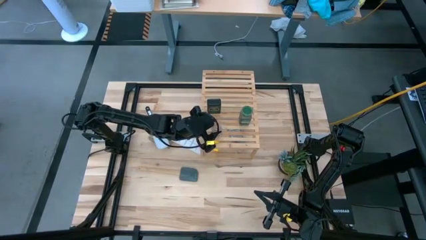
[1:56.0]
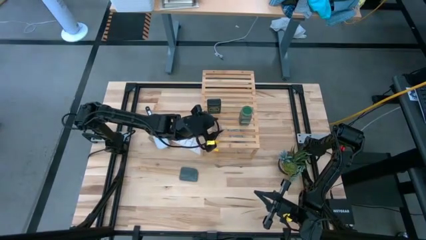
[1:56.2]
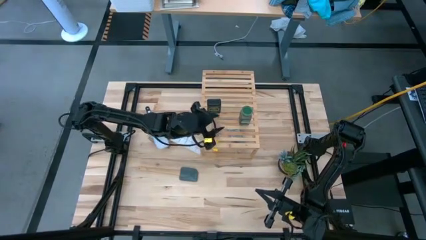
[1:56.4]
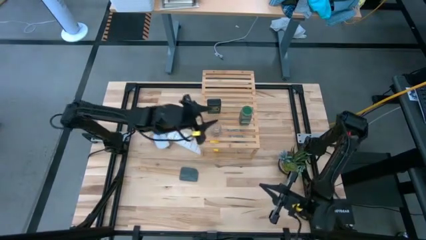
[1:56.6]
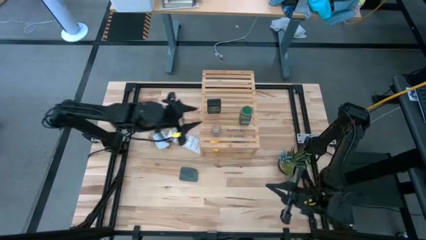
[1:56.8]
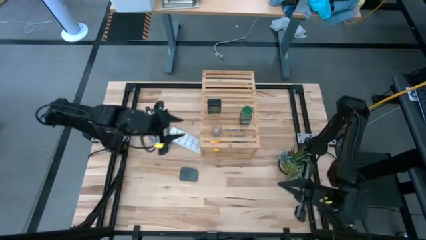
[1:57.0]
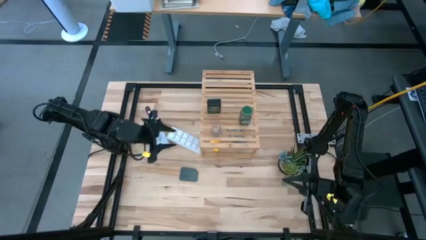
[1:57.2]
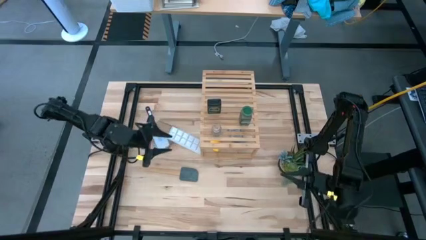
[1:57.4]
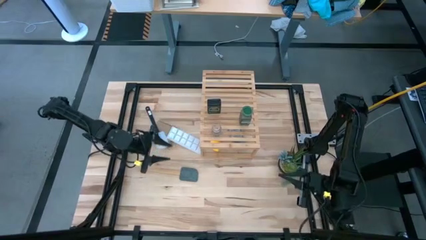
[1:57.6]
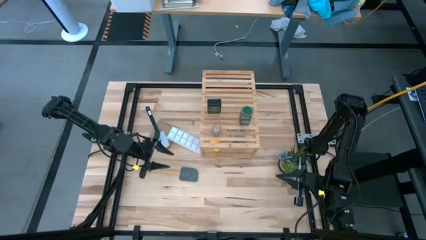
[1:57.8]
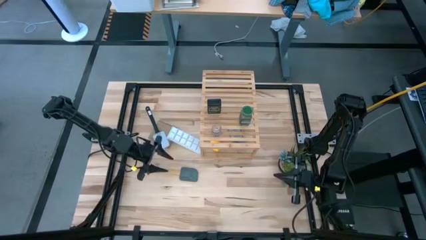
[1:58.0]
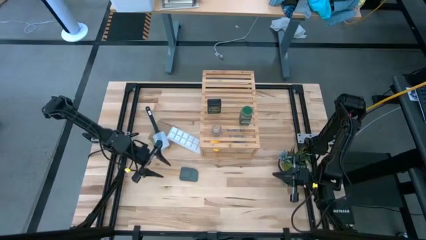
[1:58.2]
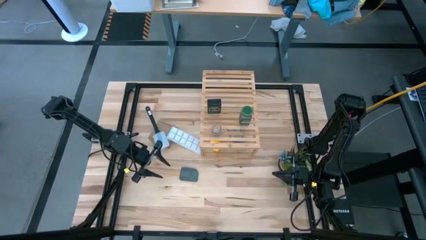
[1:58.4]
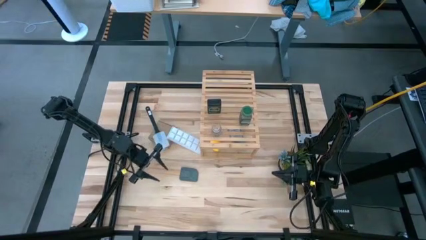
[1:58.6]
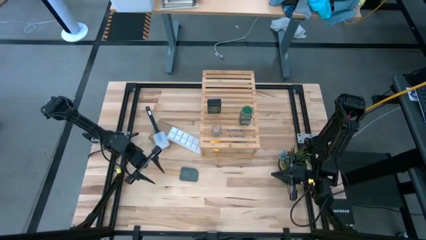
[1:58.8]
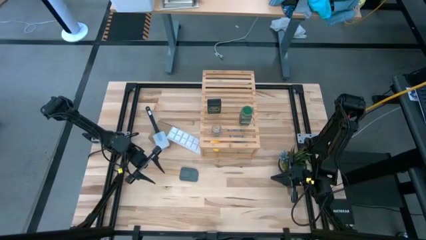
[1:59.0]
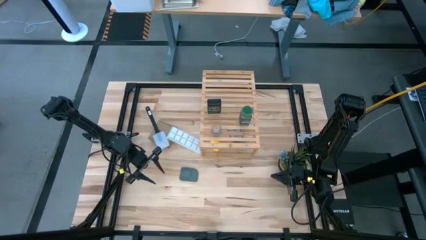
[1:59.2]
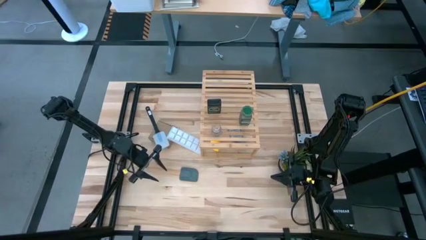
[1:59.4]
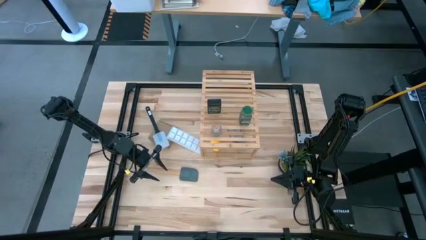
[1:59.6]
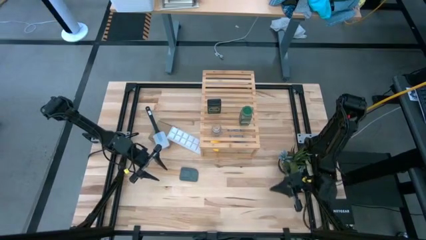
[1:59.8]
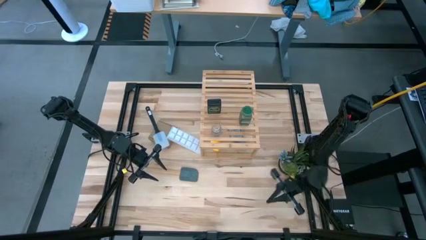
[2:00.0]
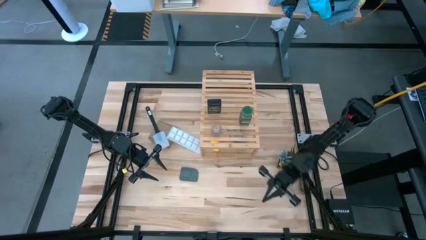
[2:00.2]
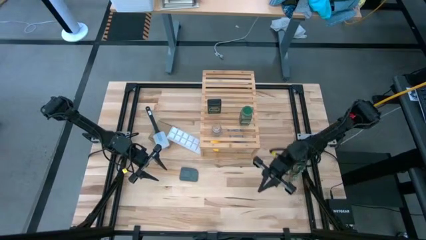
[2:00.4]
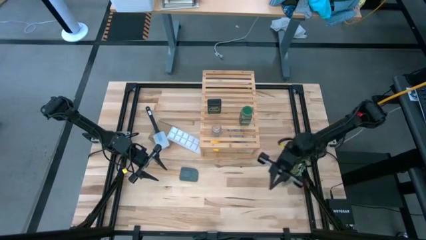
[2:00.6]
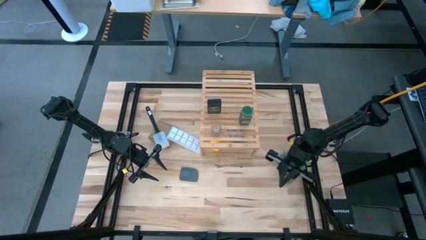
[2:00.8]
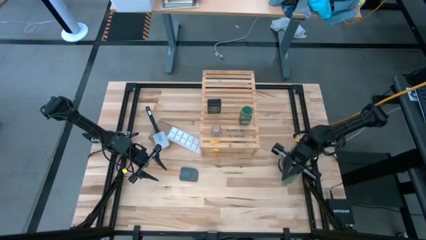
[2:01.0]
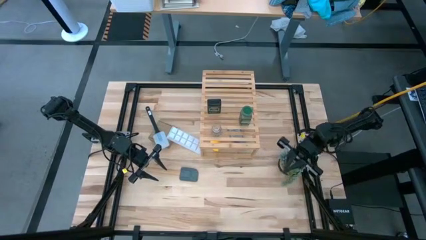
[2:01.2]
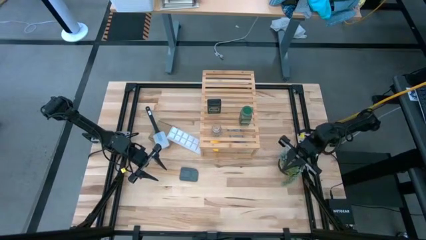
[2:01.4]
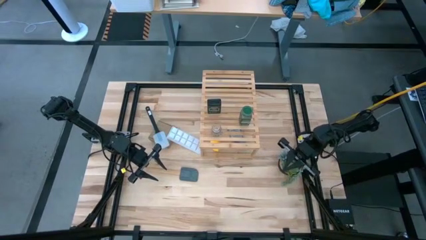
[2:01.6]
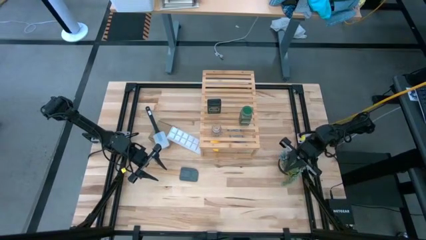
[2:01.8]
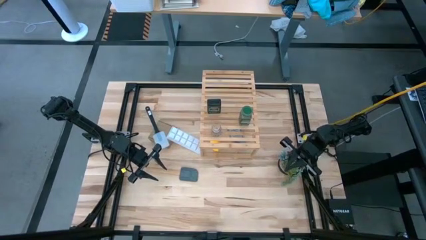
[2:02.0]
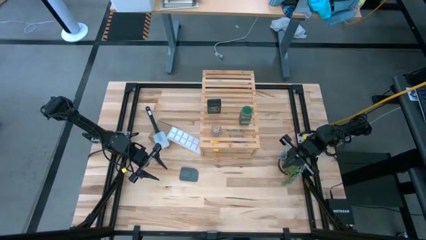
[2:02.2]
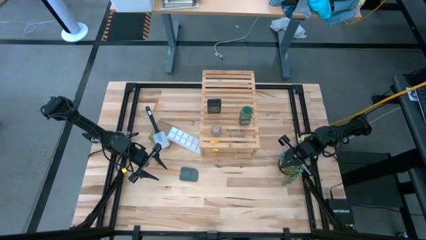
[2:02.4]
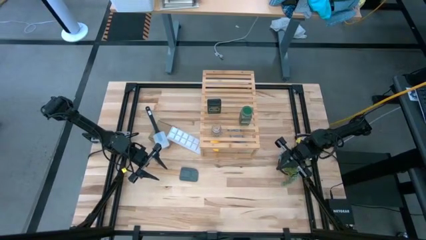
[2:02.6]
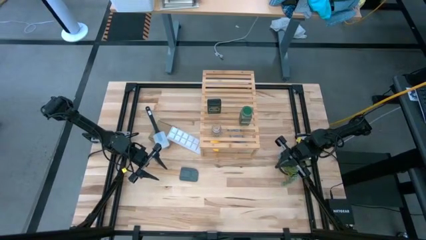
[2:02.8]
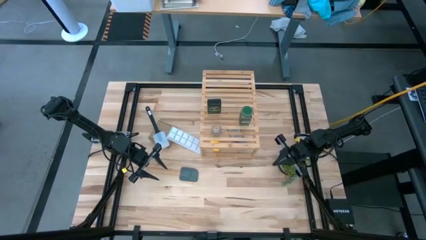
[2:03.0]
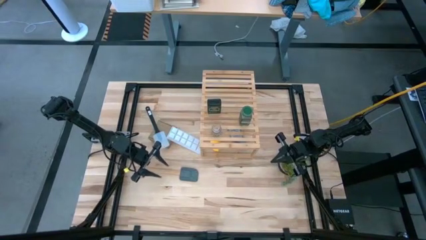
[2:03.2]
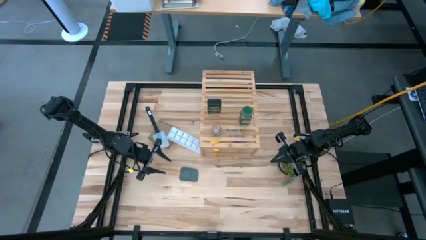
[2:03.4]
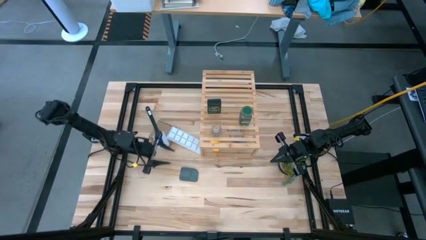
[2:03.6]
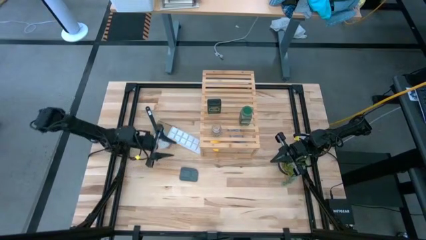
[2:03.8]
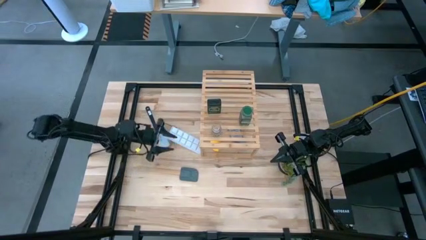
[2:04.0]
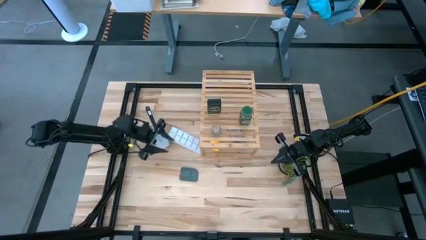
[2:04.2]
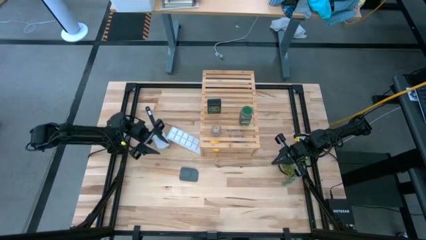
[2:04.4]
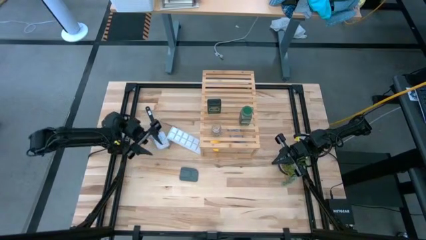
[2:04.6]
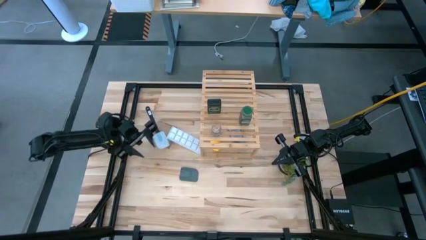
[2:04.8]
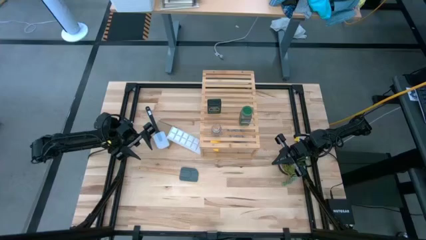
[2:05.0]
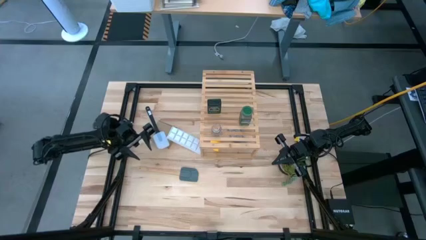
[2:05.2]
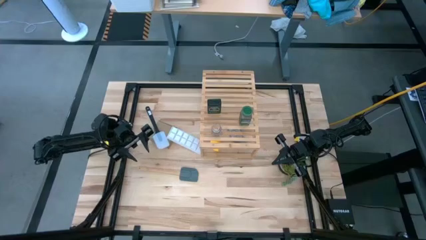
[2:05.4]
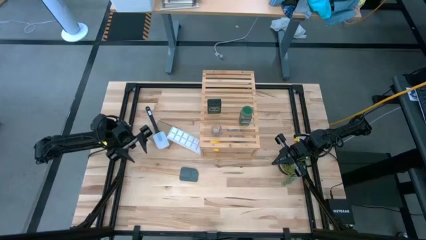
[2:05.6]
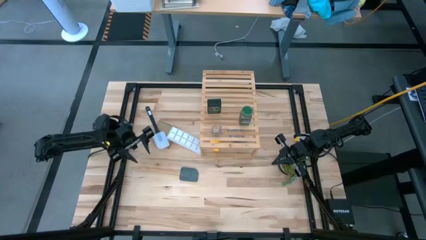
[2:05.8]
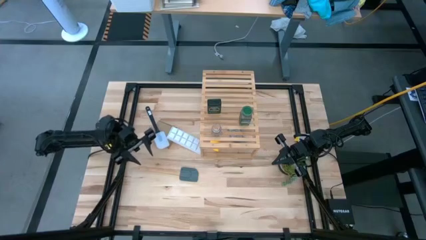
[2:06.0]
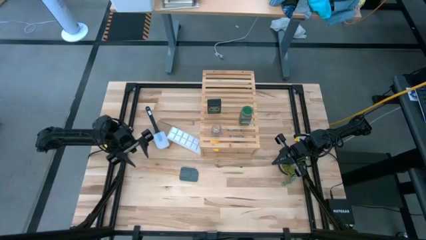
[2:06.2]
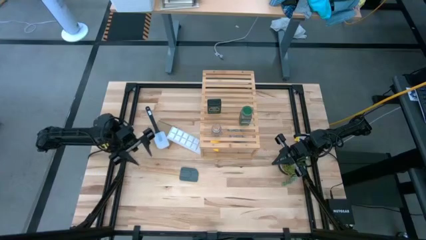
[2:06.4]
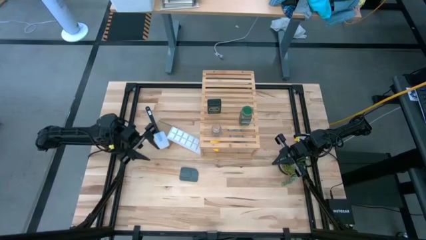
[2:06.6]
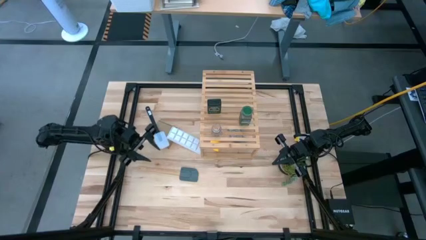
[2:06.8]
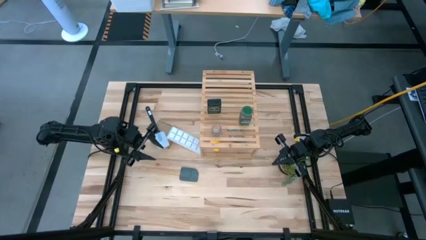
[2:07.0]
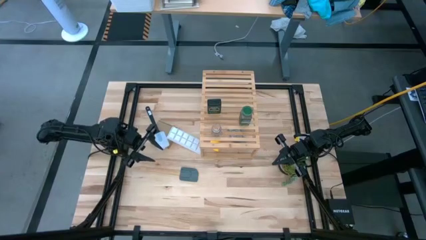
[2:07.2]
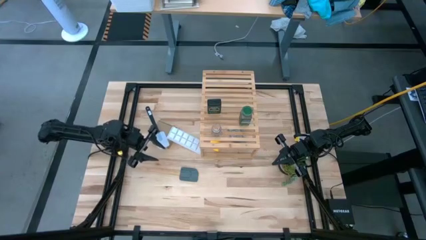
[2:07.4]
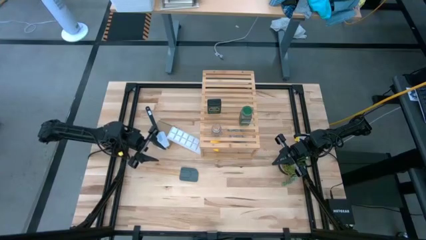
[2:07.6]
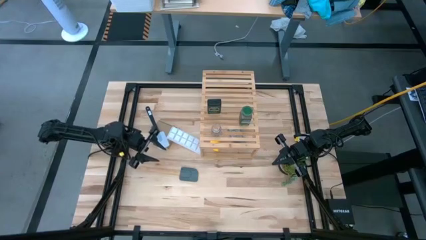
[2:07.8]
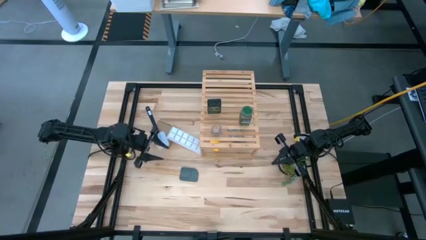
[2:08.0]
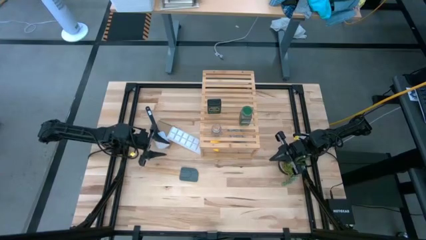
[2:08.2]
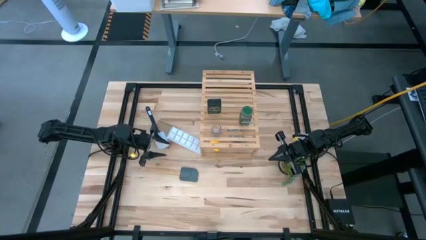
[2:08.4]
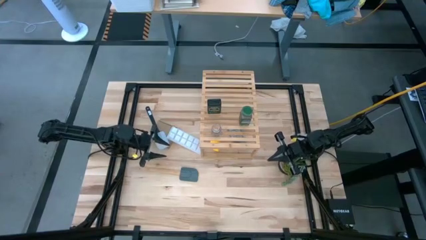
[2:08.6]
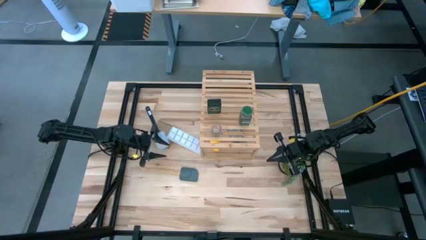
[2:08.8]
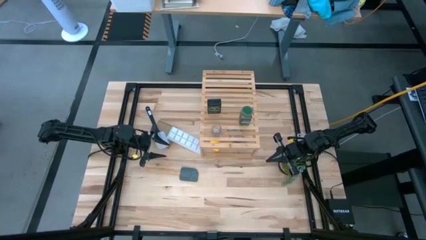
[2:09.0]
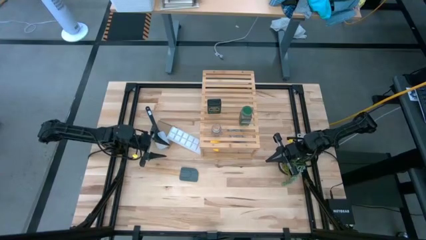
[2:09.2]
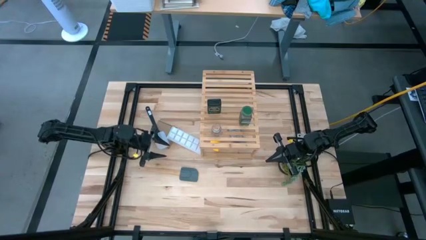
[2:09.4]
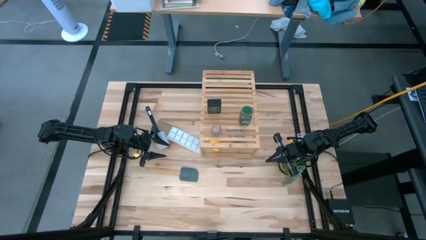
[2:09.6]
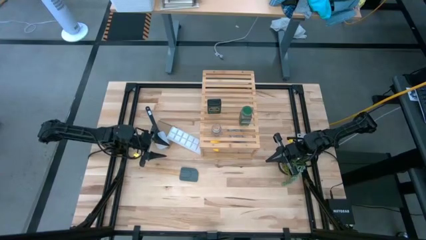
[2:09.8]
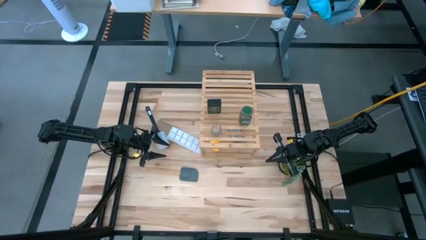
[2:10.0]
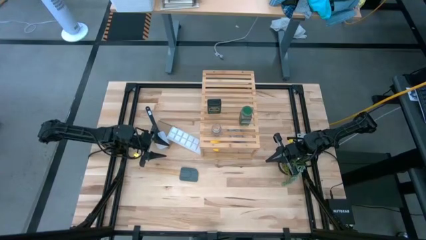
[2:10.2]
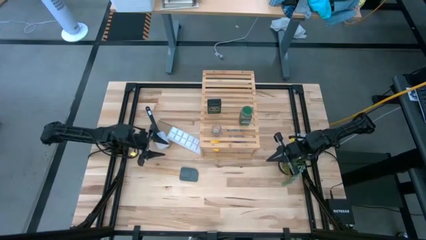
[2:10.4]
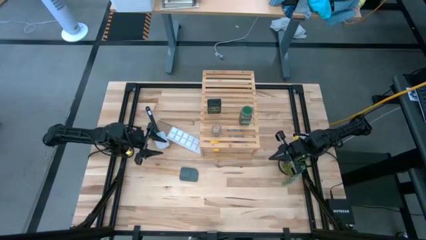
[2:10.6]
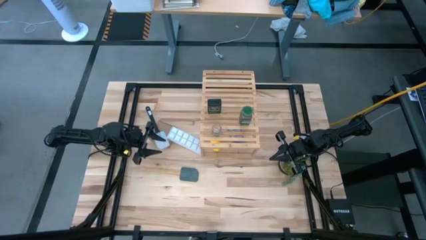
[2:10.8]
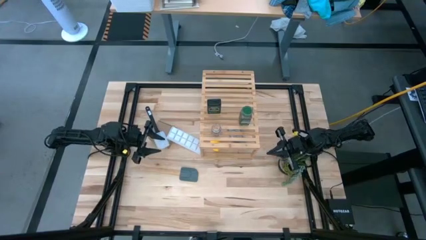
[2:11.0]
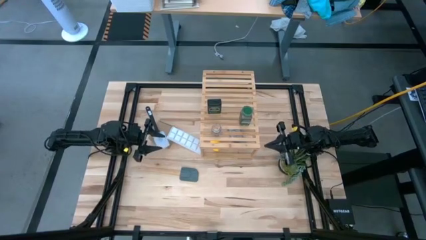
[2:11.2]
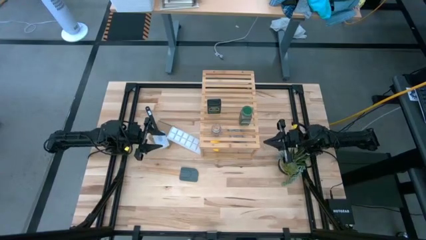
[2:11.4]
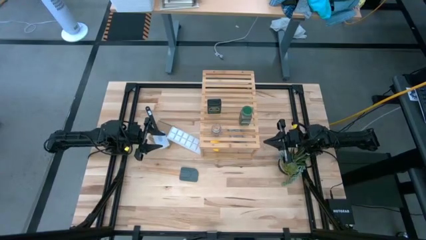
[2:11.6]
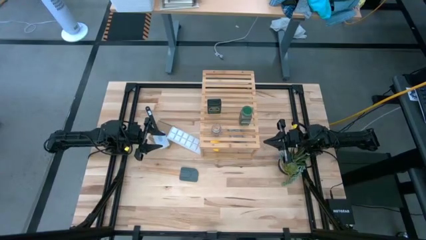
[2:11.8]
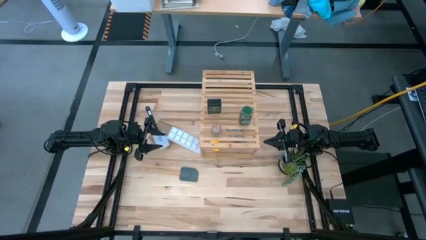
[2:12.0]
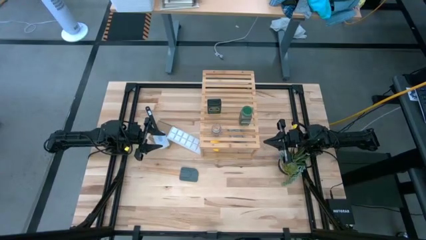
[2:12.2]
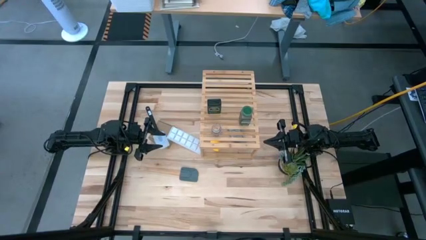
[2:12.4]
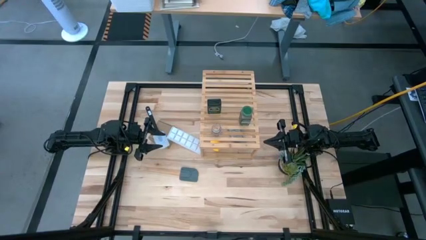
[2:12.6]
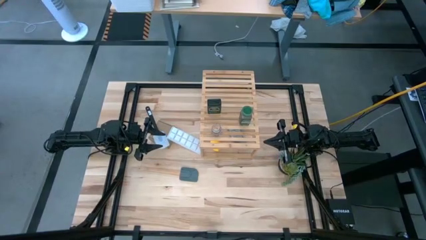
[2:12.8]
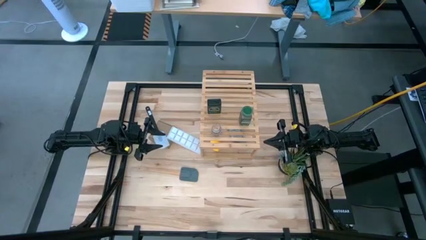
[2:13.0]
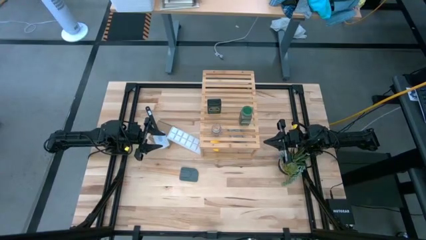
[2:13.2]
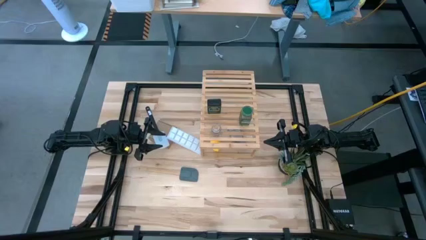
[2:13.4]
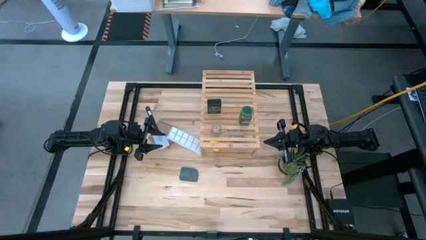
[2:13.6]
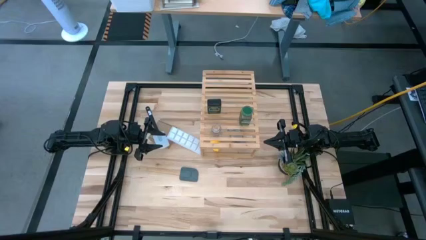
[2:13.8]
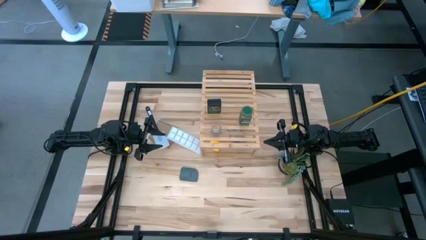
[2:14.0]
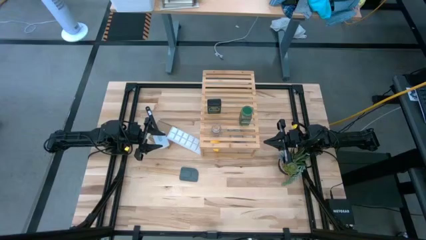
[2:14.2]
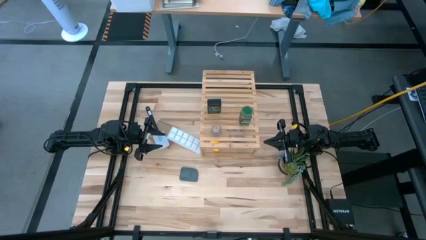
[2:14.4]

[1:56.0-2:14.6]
Task: Shelf spices
Return to Home Position
